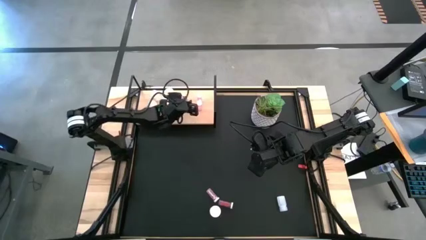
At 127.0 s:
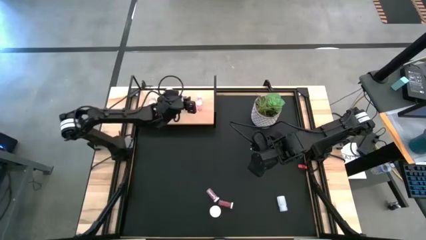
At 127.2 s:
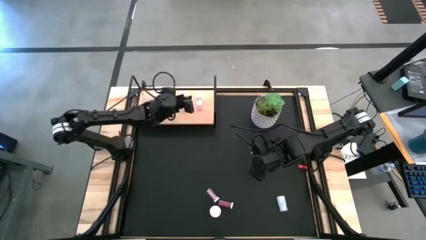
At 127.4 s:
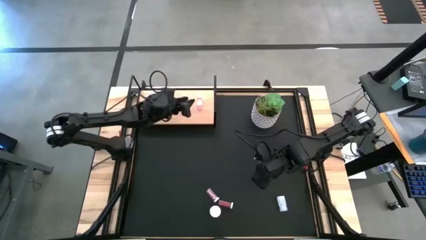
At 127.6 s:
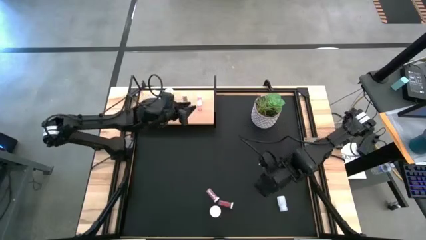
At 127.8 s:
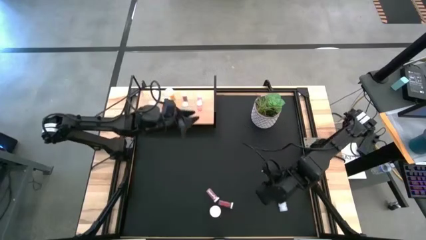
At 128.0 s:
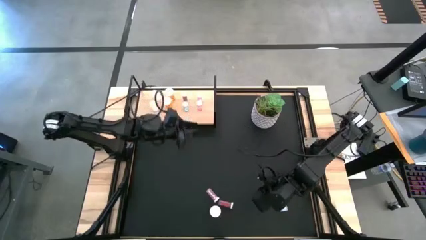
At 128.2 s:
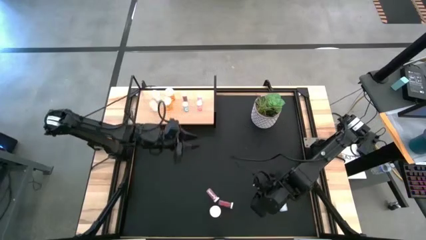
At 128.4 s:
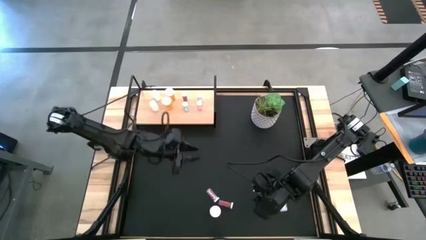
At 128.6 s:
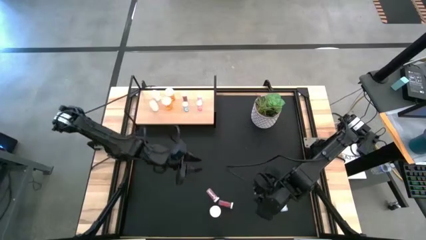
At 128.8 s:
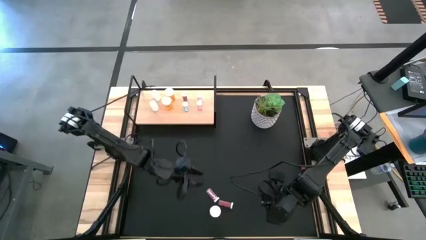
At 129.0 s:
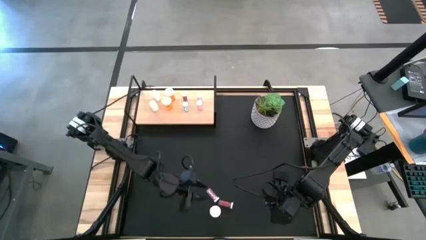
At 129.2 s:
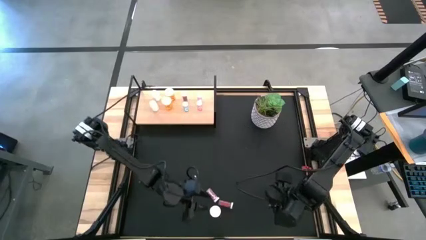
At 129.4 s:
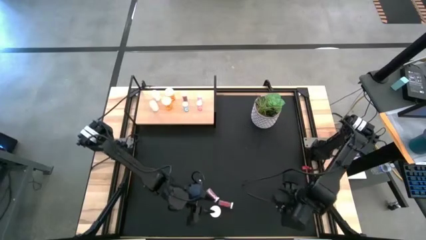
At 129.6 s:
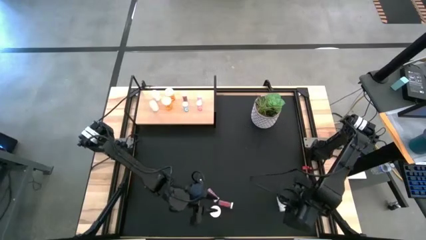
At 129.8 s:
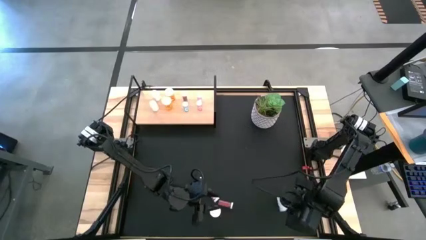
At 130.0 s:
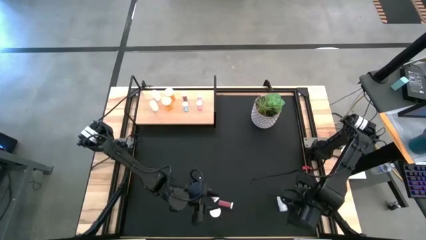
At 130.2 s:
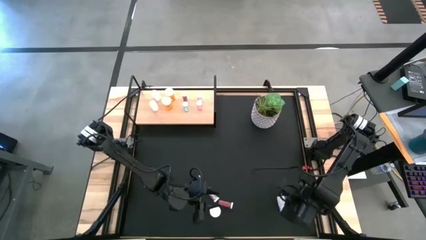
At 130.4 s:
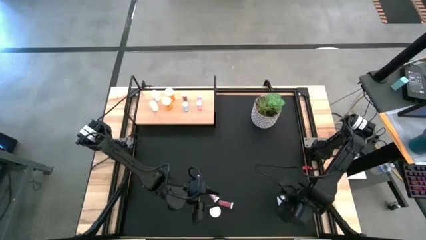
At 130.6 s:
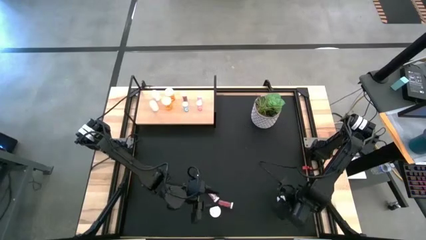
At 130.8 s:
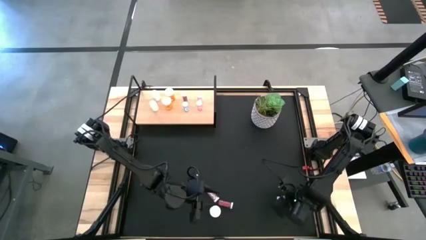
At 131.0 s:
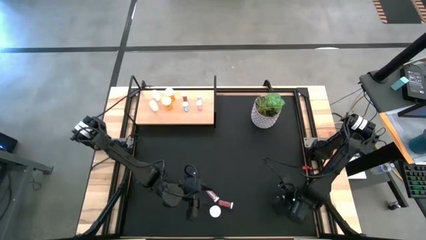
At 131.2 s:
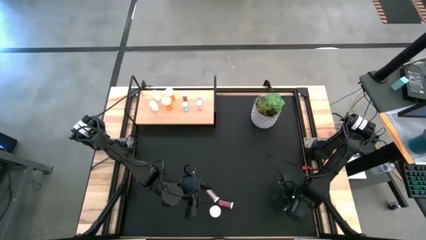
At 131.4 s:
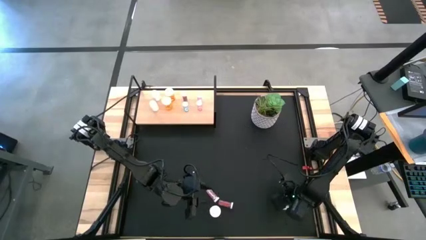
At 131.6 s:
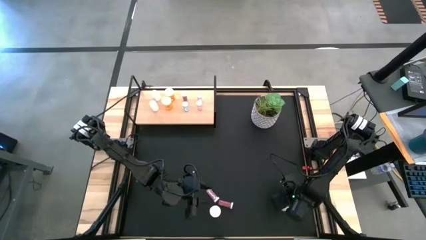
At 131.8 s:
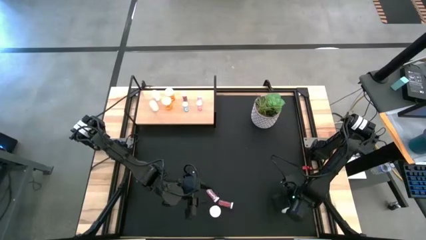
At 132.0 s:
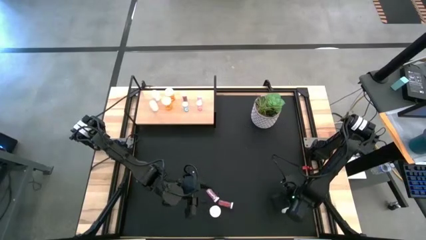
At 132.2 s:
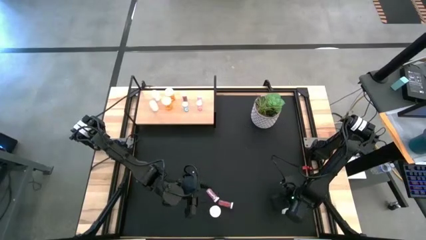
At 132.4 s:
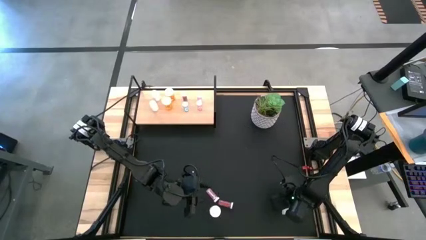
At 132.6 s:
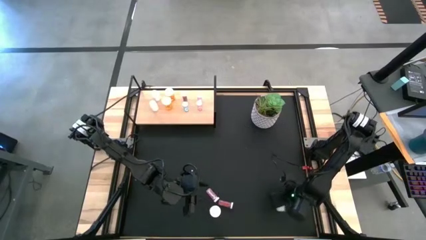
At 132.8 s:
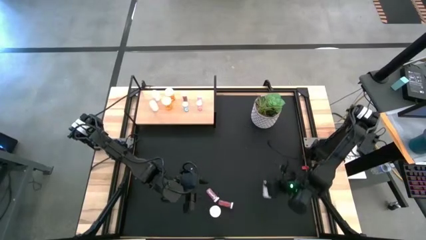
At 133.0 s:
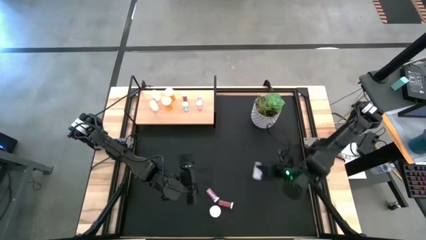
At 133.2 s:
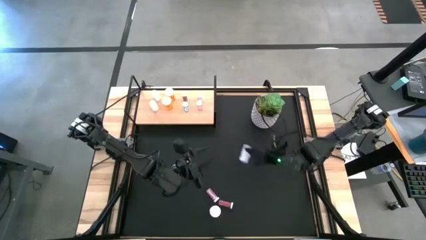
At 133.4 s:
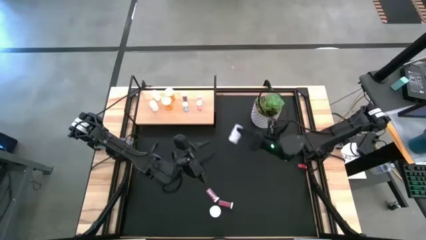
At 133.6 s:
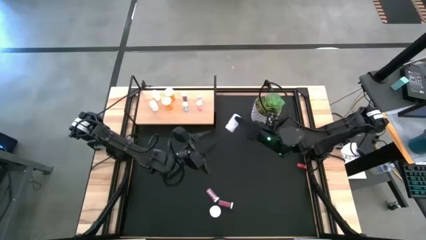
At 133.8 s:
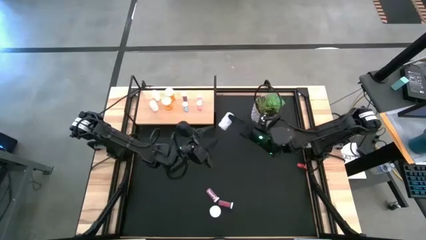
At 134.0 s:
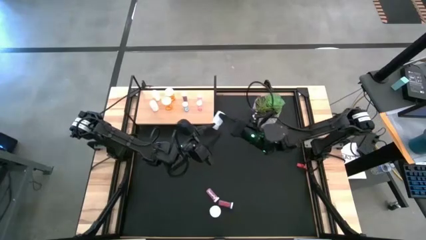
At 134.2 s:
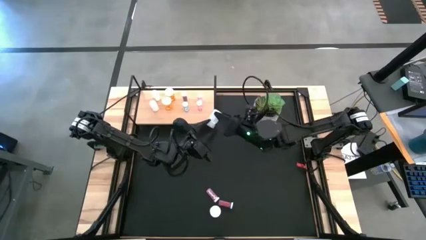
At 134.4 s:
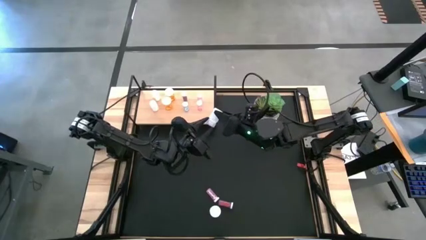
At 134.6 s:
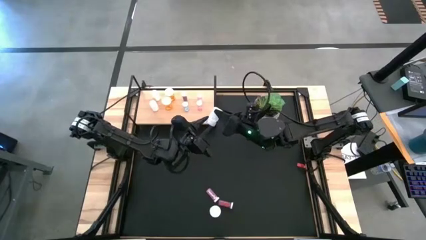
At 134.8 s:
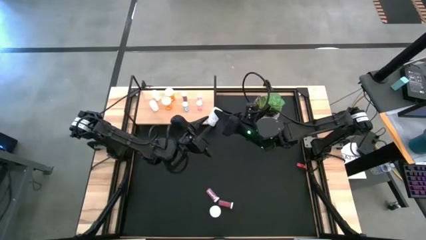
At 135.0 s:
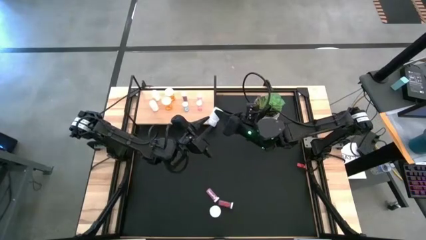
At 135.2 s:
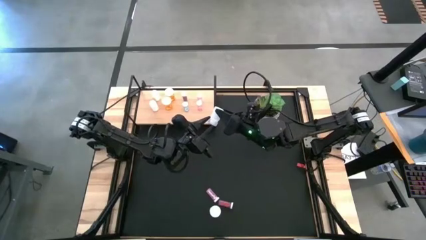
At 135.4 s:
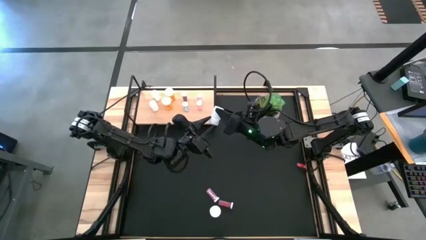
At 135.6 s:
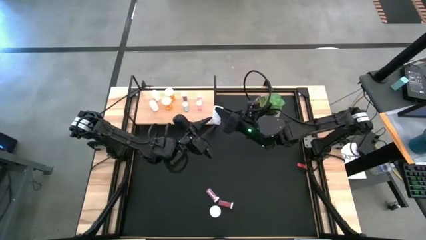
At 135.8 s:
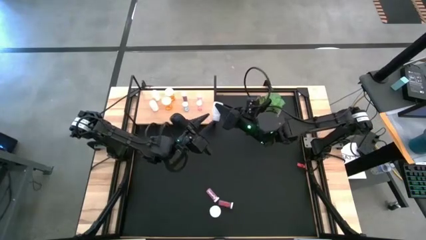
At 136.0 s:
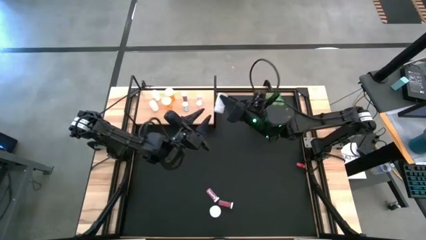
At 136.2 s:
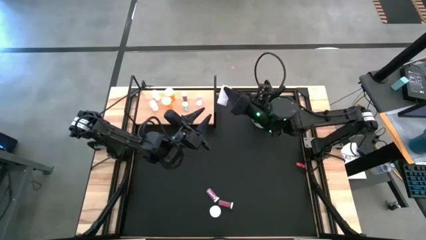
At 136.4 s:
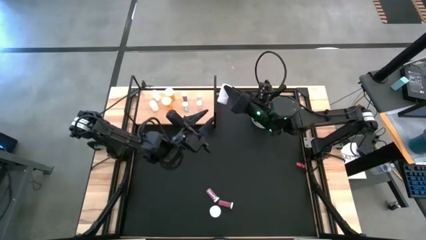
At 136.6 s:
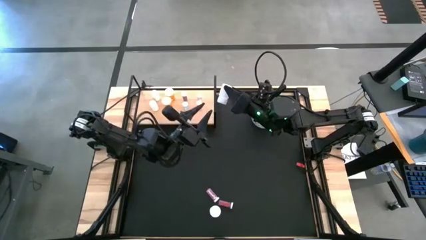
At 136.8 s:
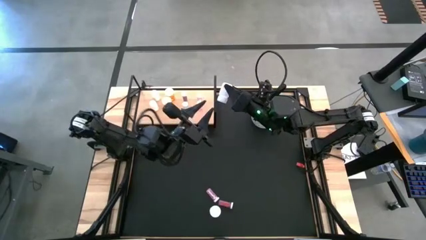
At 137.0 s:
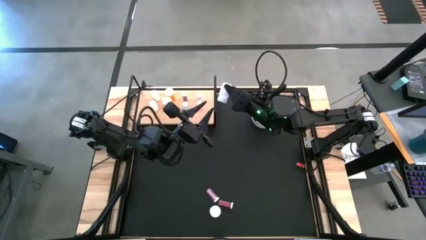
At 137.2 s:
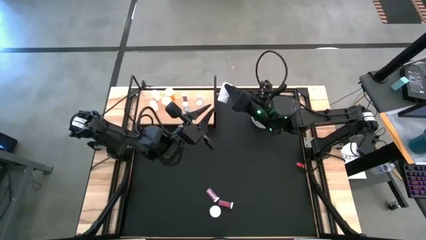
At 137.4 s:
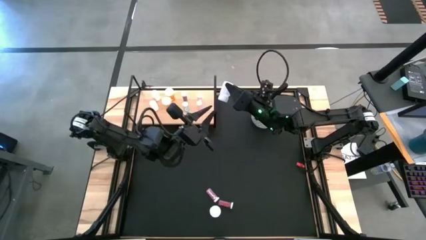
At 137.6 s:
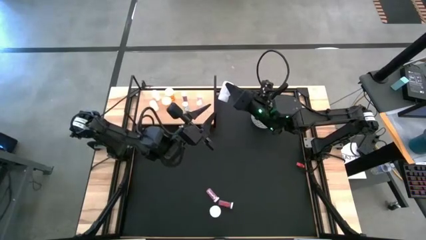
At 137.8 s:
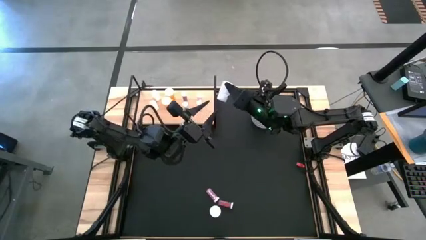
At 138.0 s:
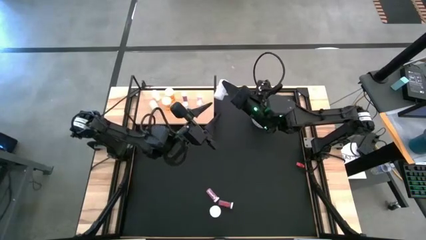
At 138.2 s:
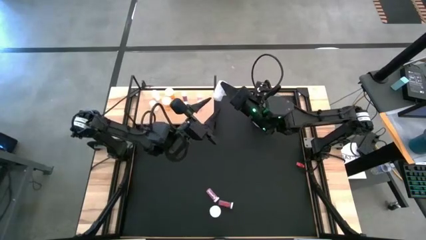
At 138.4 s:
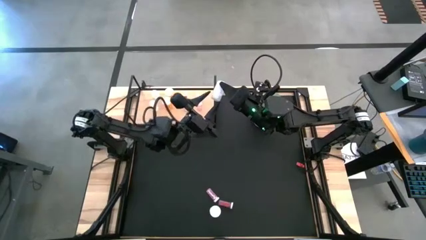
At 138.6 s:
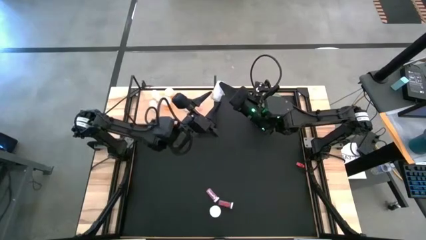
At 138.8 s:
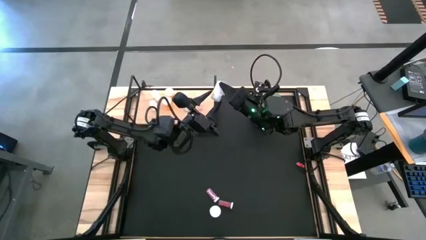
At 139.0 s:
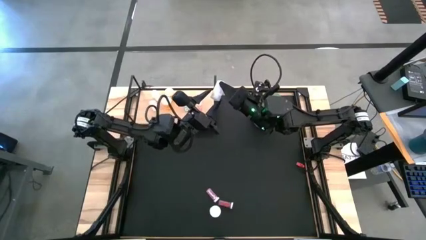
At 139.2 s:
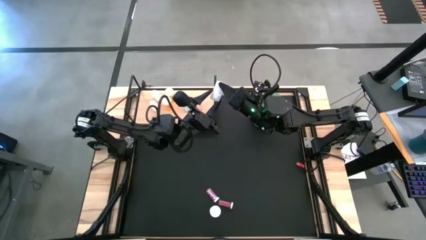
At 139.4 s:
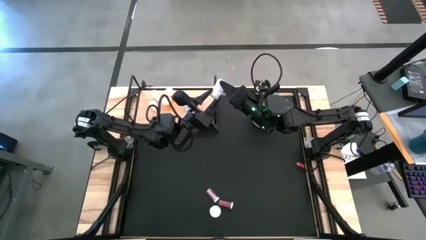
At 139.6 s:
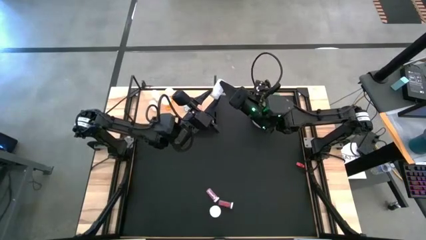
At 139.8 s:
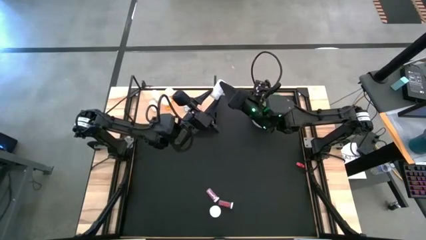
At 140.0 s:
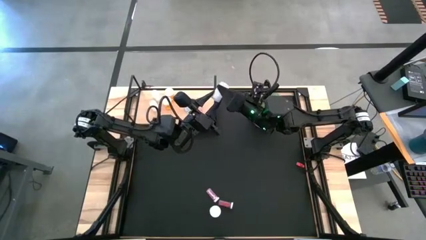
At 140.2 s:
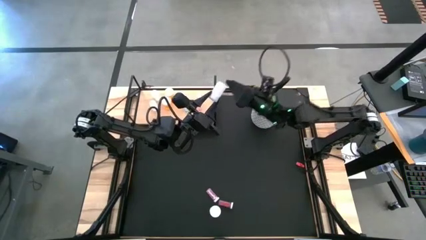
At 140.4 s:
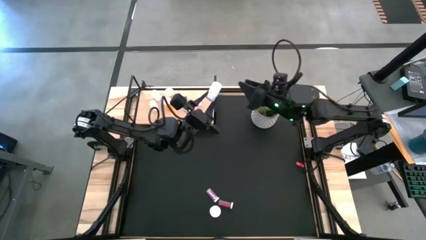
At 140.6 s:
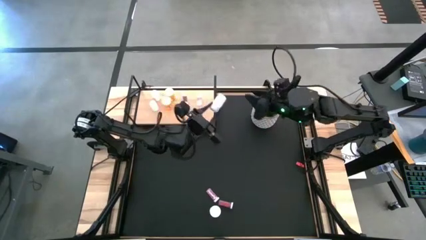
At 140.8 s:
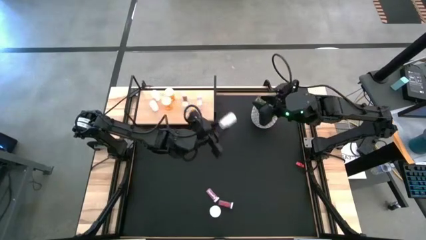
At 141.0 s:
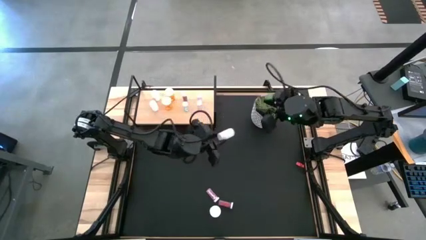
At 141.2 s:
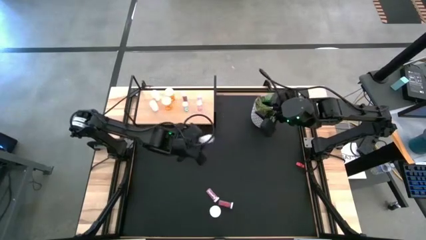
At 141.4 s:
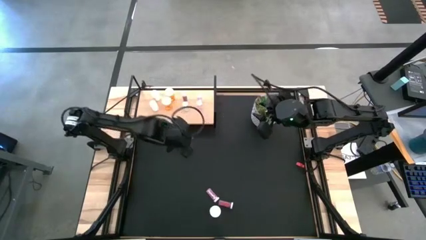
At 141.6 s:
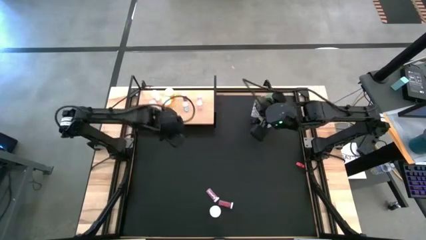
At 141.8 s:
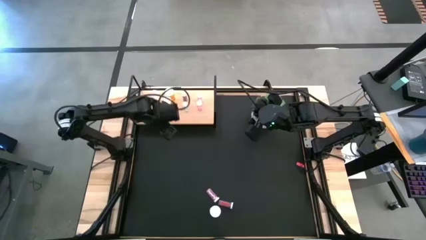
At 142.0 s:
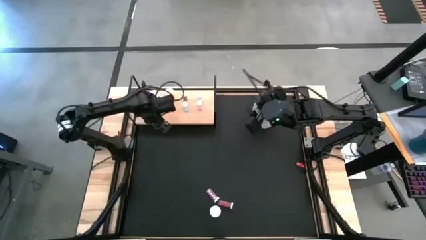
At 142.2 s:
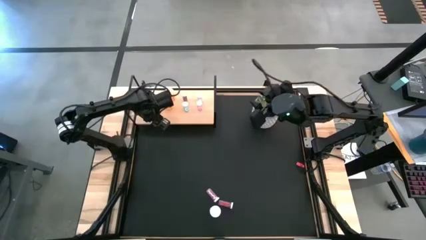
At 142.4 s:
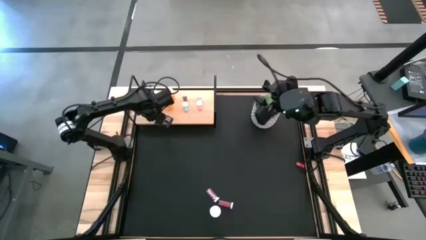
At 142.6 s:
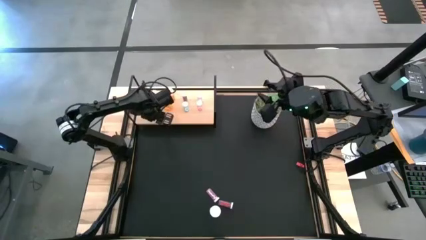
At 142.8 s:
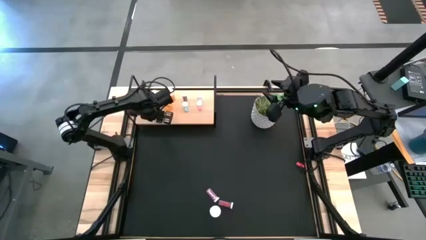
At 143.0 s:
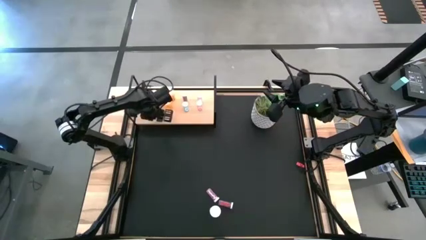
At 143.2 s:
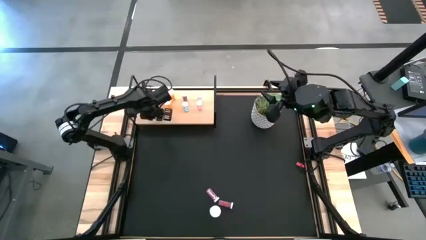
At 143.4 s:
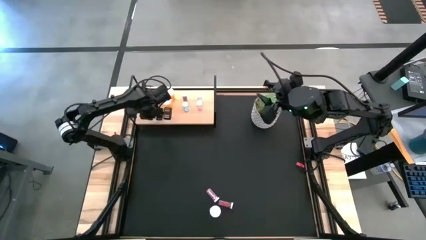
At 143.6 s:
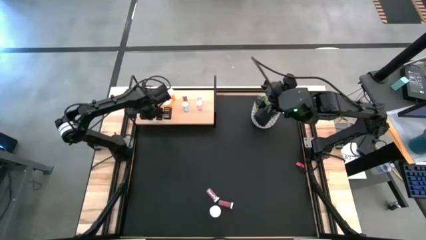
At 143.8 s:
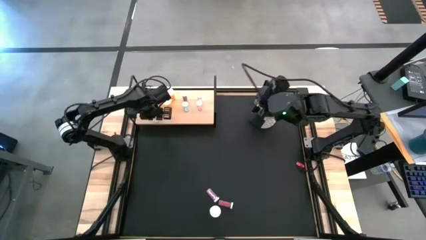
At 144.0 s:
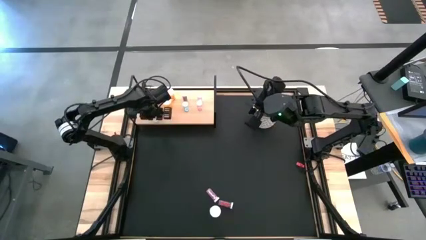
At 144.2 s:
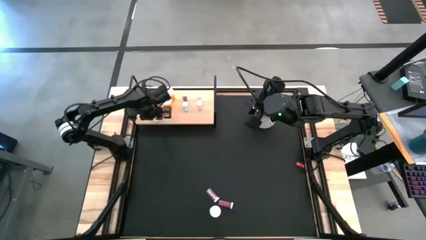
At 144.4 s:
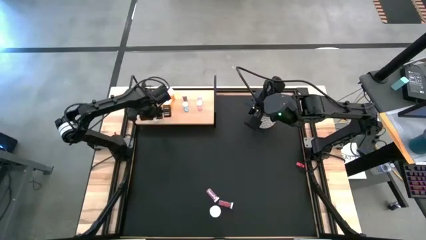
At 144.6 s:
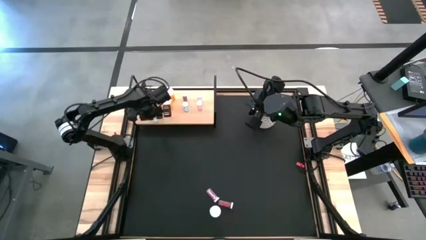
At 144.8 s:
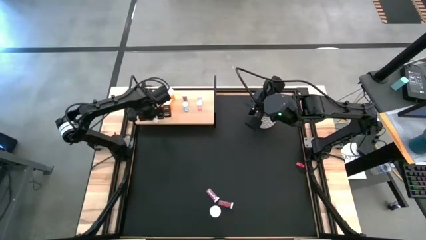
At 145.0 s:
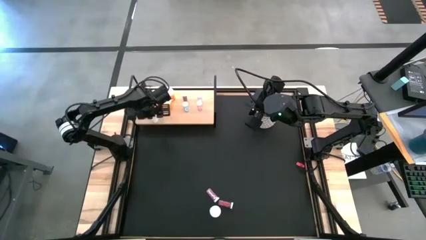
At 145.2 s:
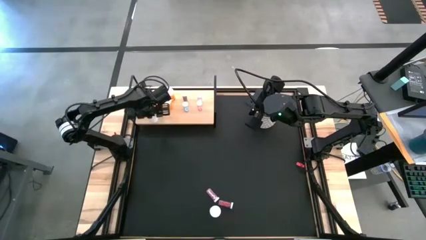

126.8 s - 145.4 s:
Task: Pick and place medicine bottles onto shelf by color
Put the white pill bottle on the shelf aligned with the other white pill bottles
